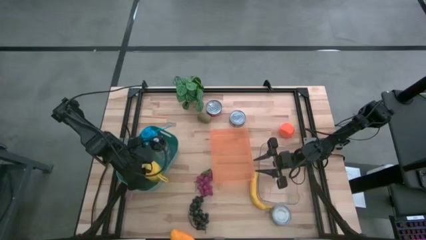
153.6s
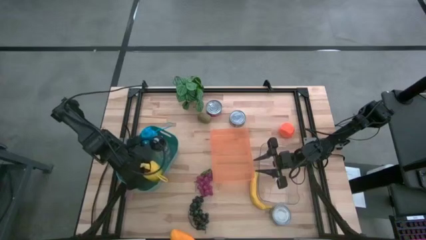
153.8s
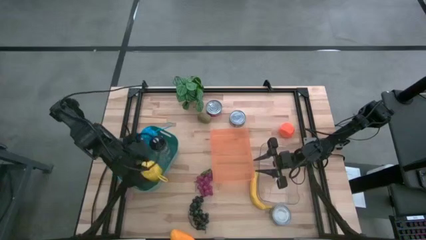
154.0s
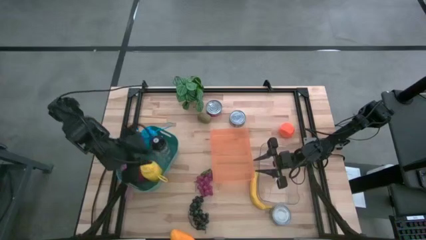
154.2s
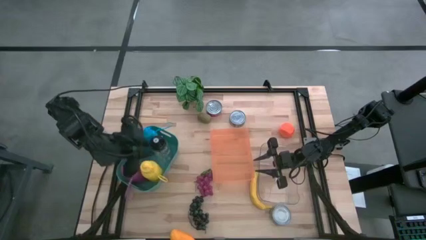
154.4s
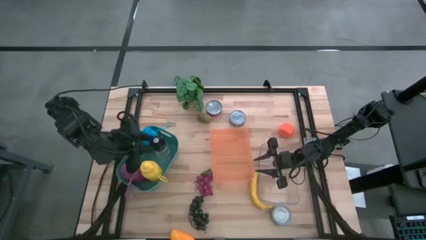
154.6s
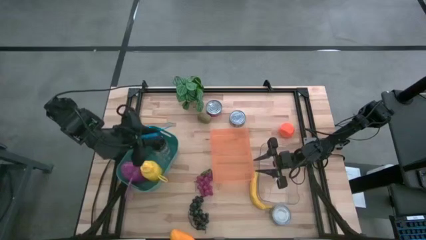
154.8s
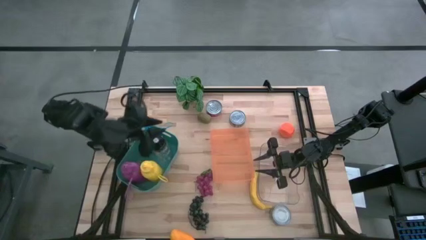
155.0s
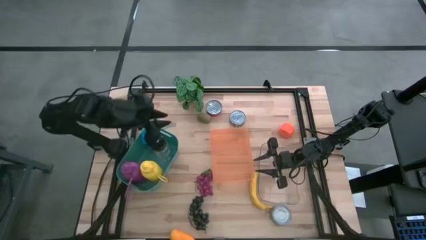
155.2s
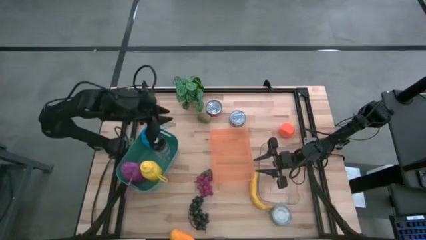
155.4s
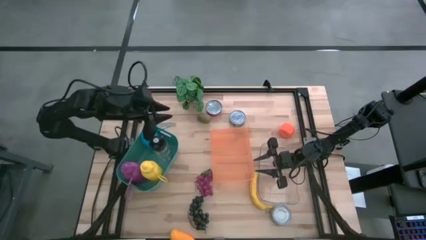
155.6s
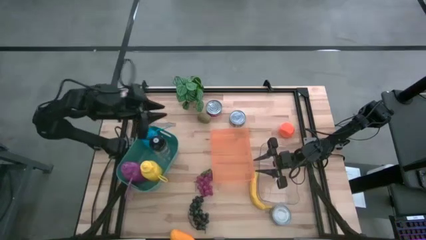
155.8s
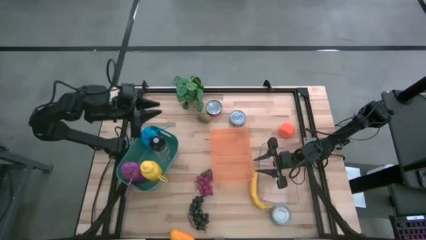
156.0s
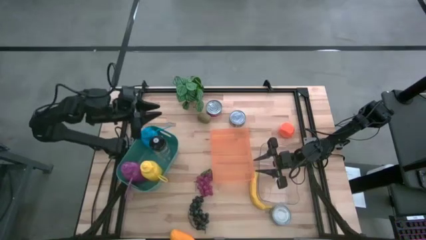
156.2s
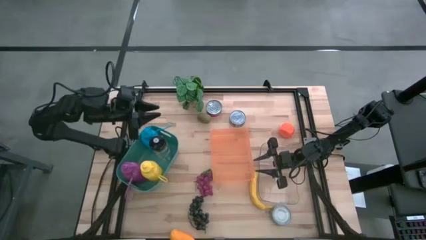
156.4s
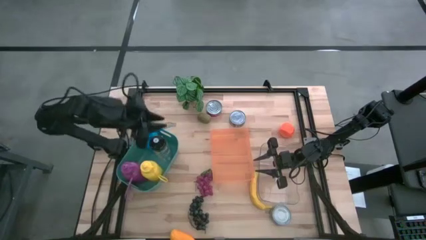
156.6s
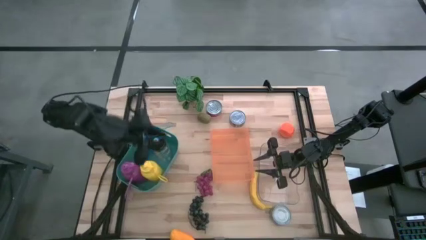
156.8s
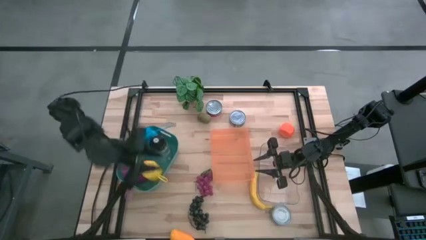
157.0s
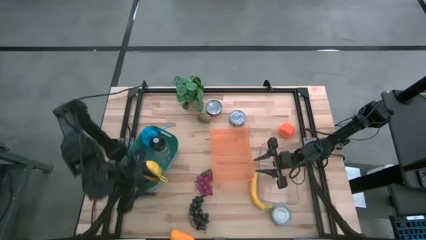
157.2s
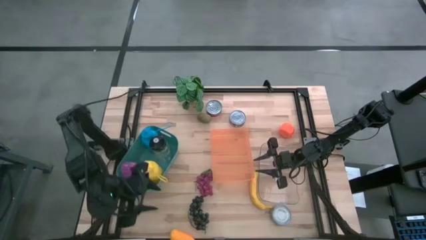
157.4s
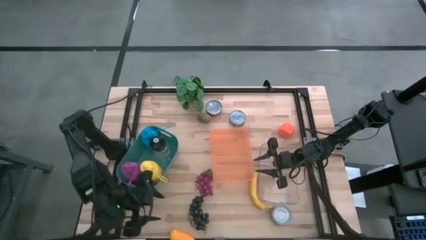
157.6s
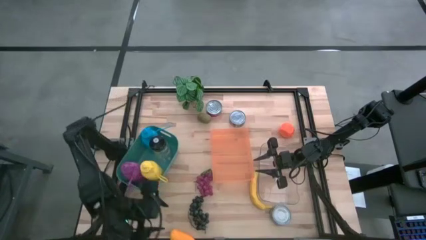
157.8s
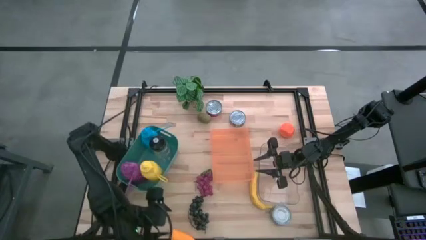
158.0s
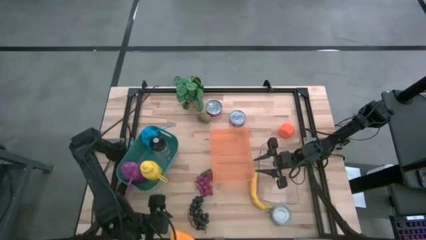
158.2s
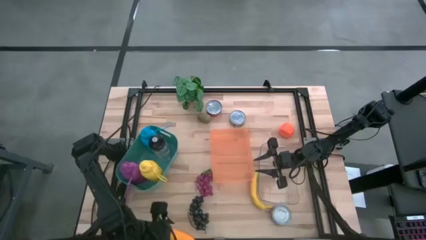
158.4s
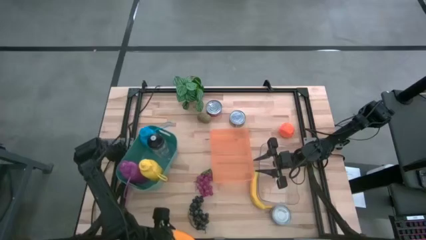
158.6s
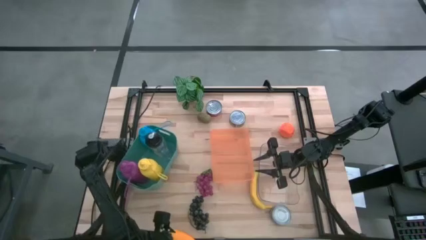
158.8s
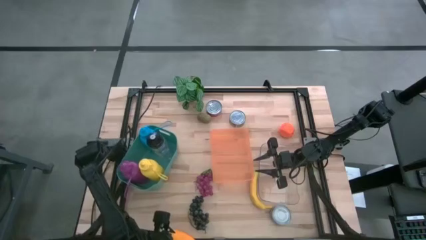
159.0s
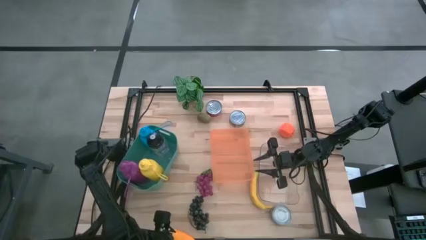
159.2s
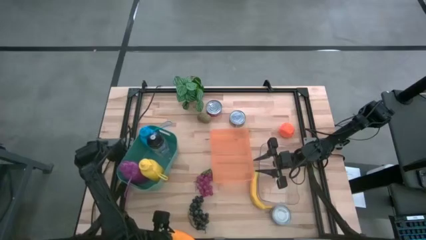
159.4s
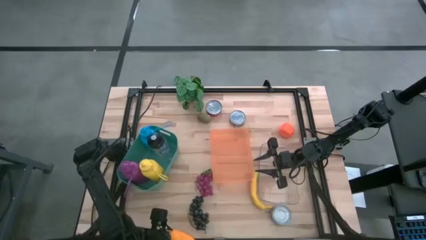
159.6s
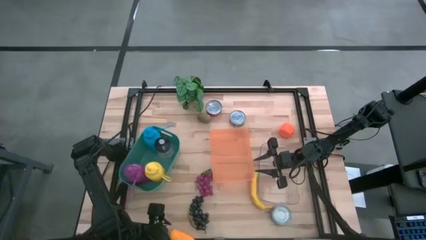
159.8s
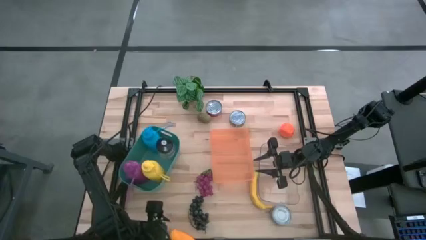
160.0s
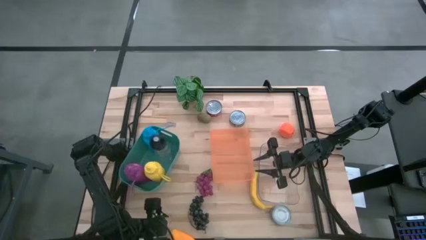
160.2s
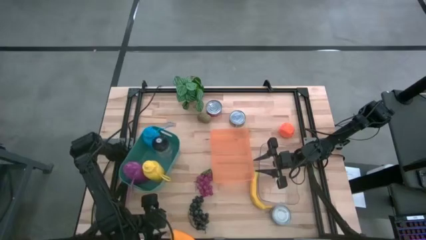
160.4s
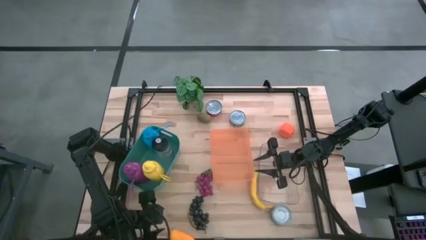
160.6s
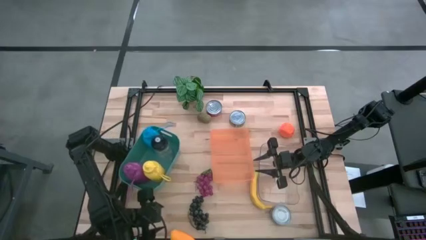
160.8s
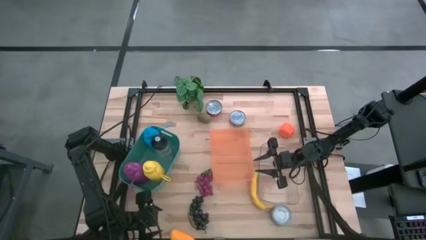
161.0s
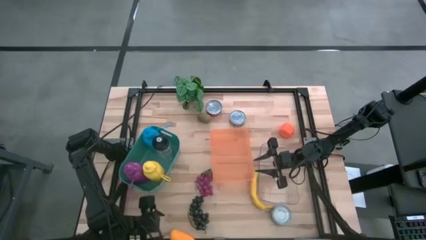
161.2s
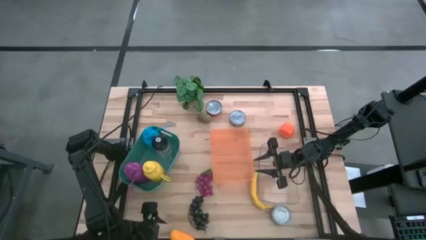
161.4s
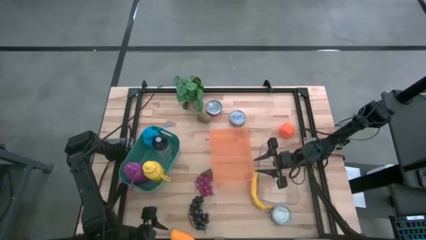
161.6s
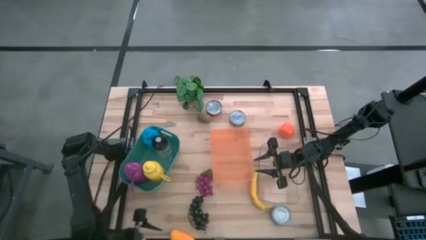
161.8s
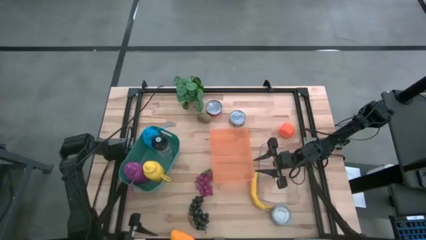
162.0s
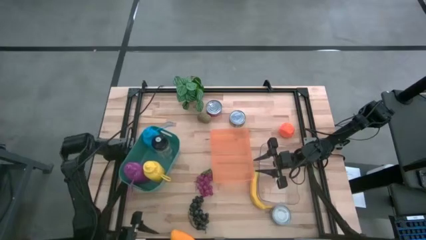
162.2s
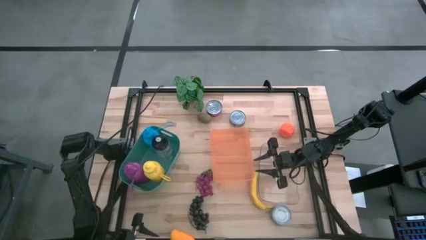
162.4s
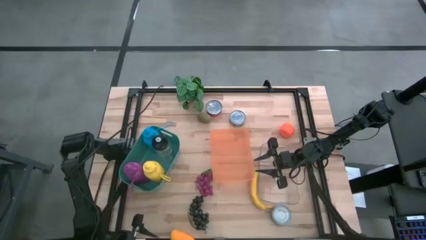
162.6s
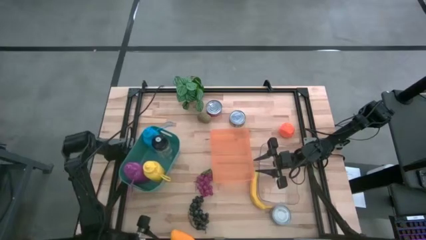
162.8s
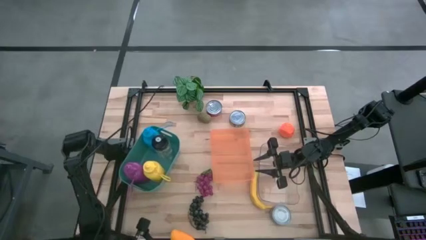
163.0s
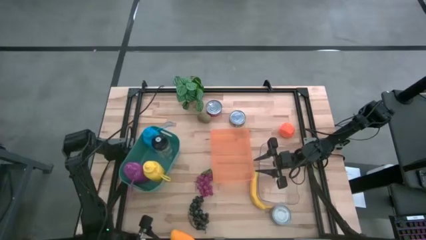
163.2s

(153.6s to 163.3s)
Task: Pick & Place Food Item
Adjust the green bin

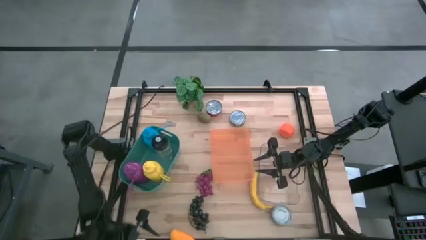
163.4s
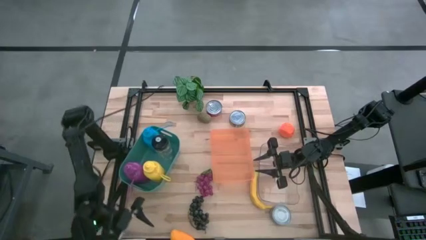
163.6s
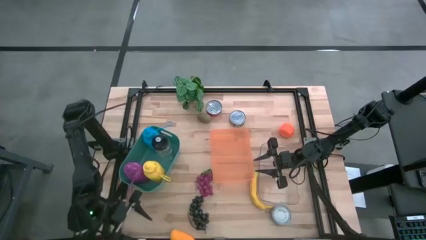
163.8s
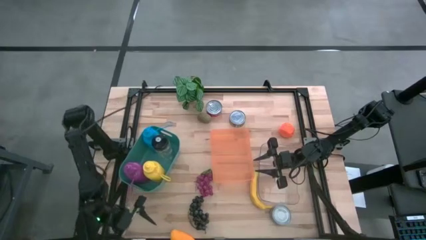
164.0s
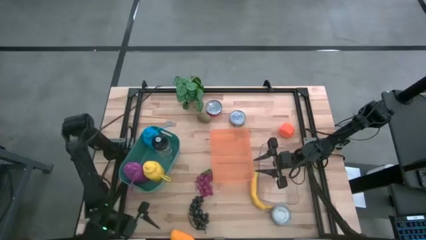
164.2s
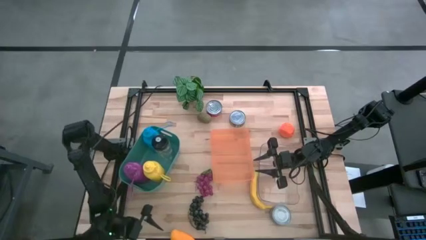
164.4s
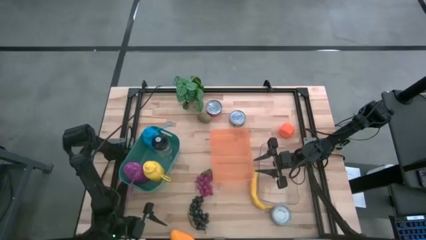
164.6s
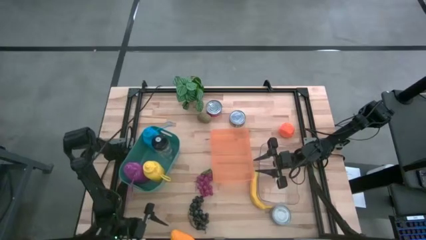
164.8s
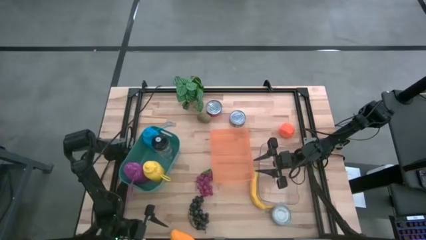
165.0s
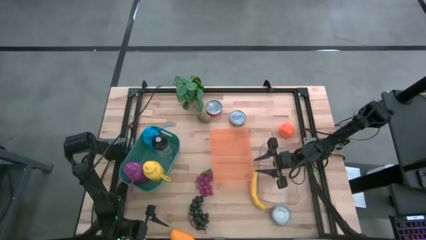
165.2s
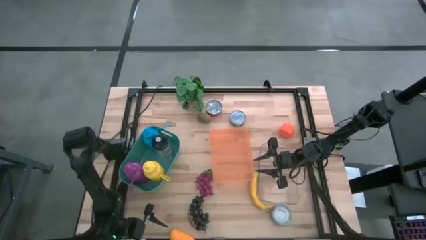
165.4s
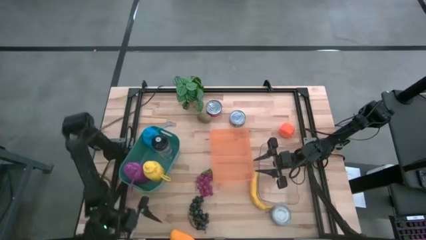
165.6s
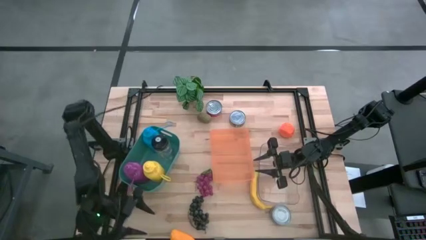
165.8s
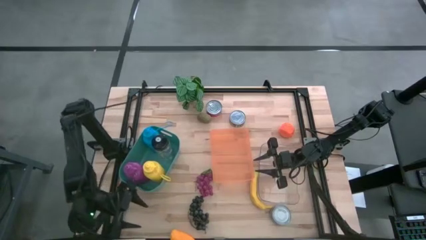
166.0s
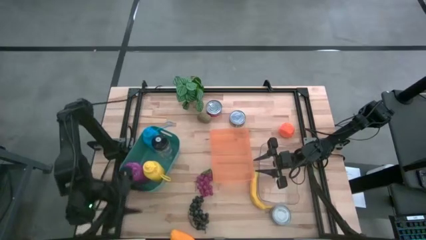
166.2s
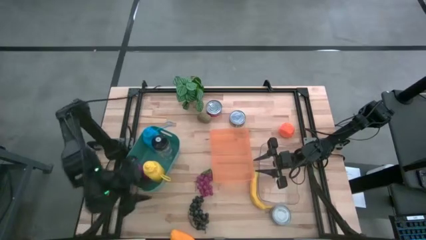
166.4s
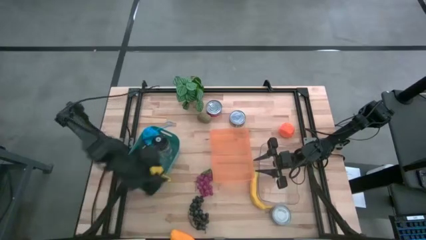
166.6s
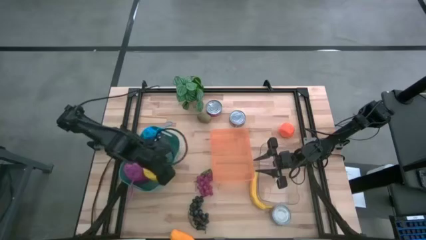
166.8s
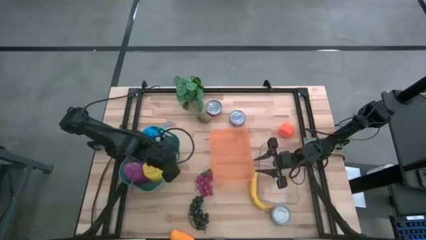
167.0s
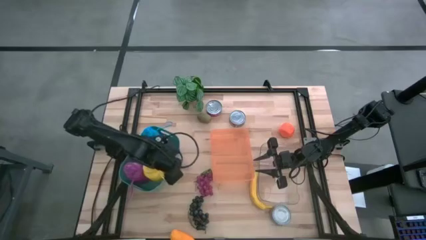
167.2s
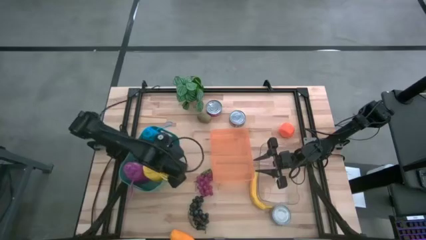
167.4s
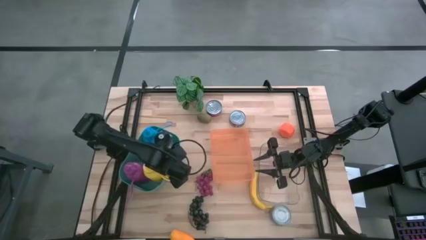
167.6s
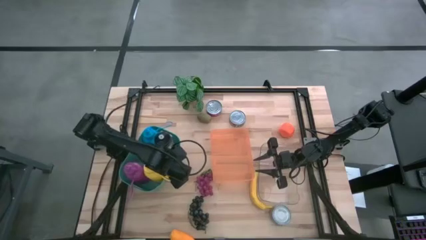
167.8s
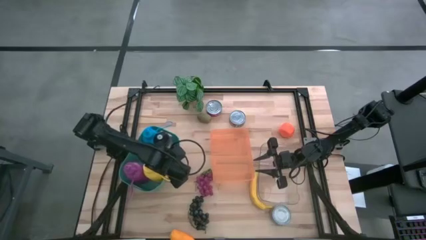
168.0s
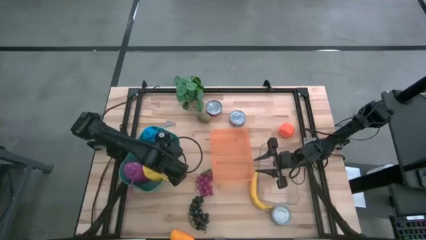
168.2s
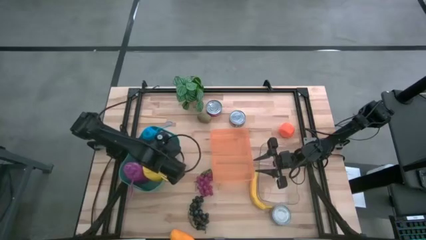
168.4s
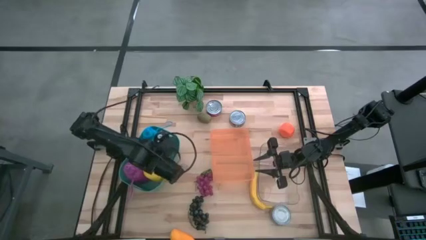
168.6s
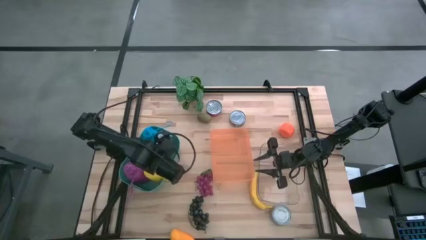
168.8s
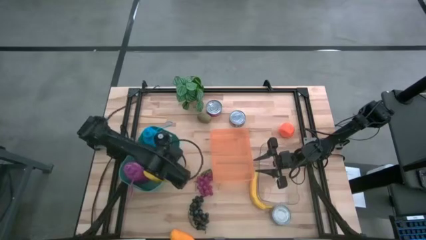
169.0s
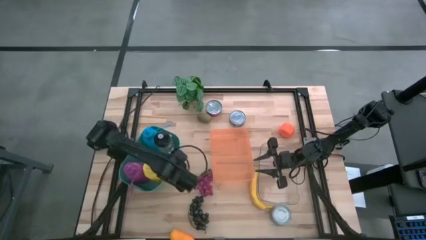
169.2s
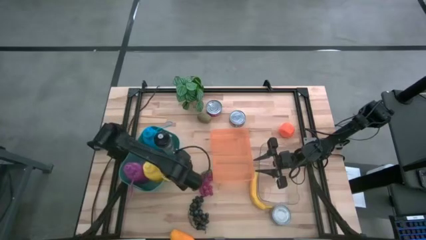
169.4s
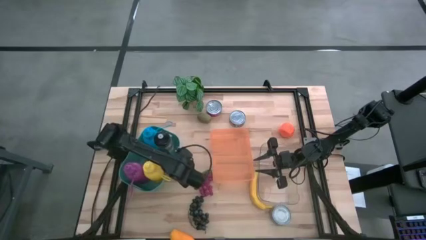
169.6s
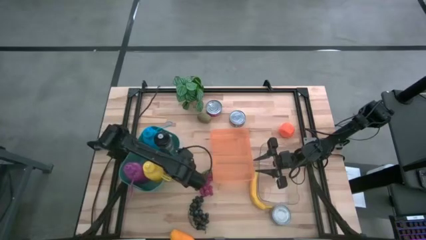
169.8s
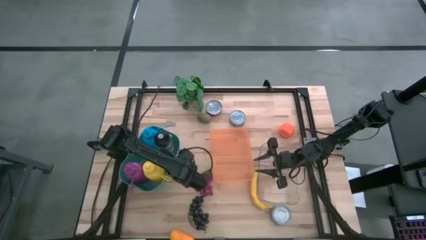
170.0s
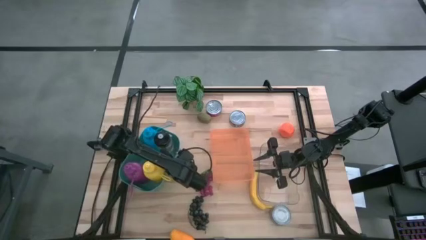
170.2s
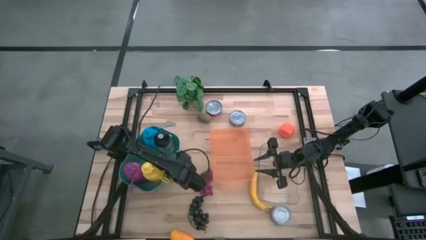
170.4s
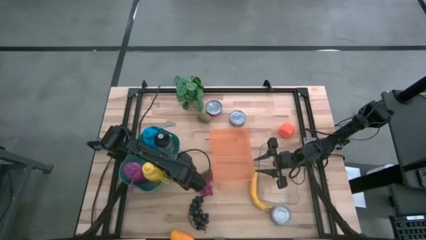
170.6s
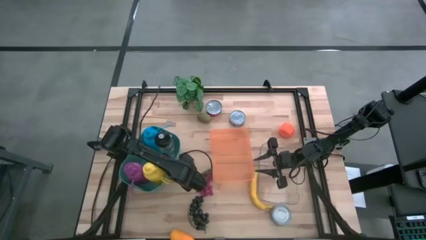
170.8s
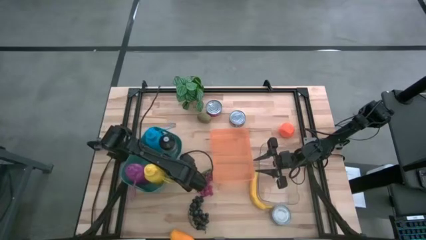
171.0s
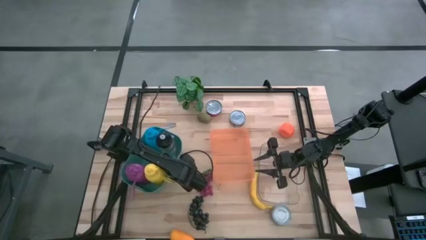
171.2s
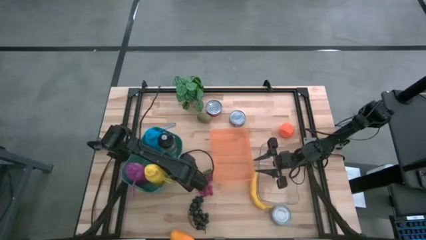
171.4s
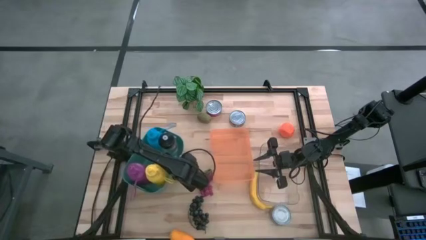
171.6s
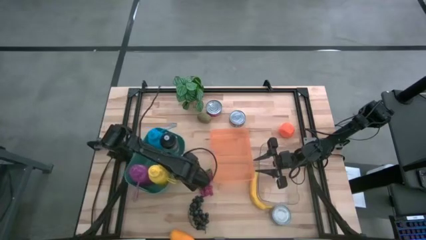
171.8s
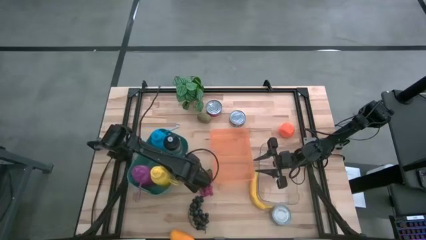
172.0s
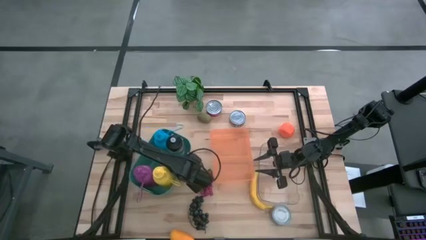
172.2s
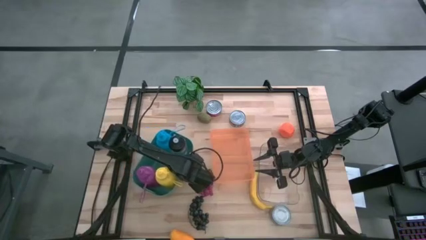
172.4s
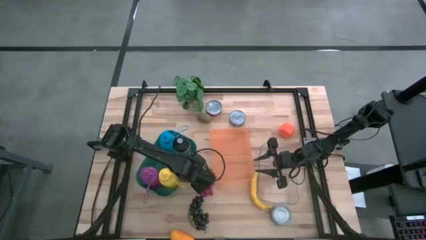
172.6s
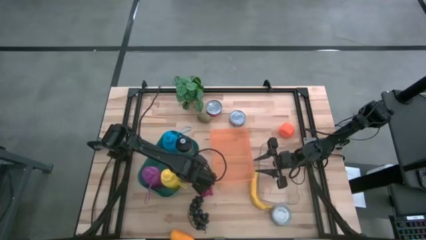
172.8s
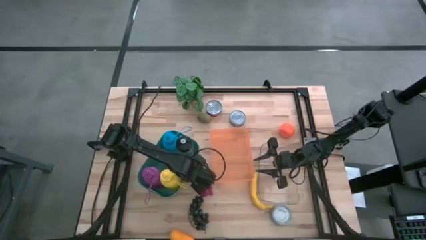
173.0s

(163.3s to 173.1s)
Adjust the green bin
